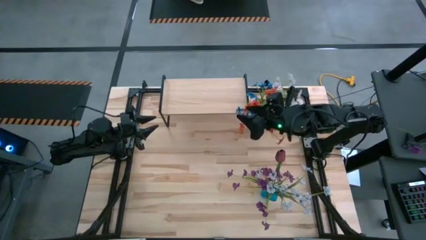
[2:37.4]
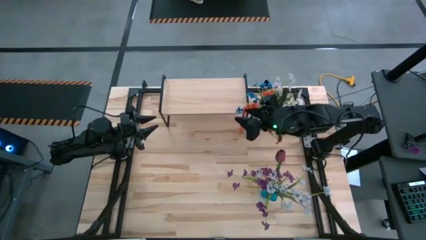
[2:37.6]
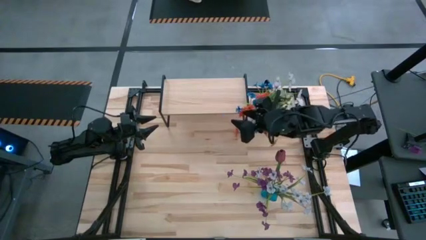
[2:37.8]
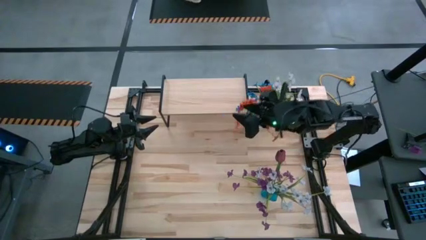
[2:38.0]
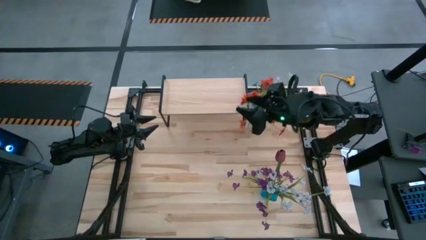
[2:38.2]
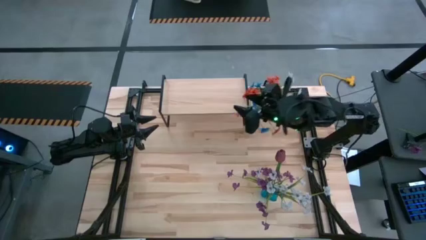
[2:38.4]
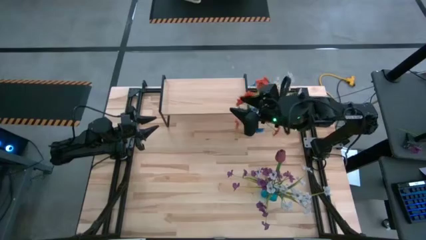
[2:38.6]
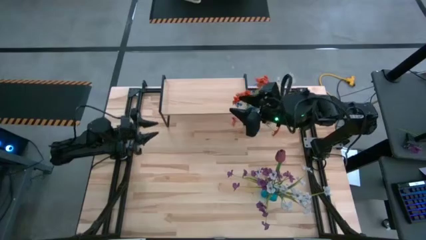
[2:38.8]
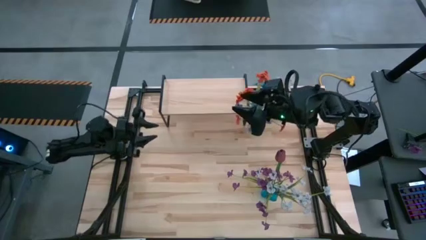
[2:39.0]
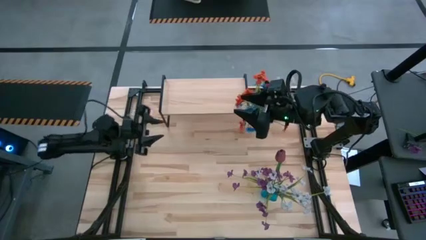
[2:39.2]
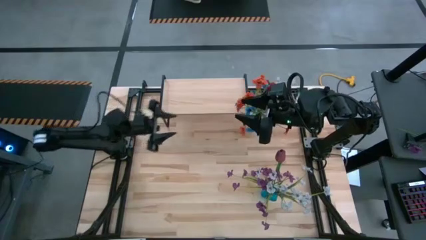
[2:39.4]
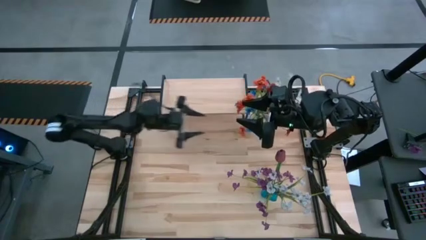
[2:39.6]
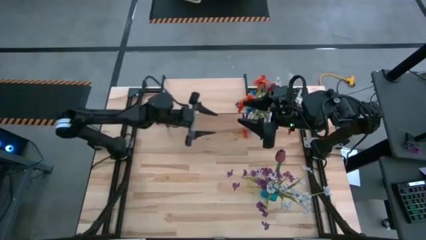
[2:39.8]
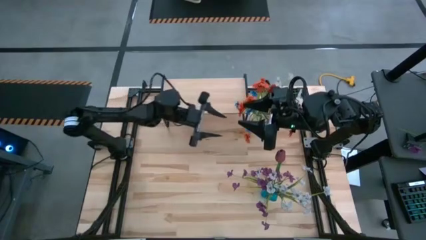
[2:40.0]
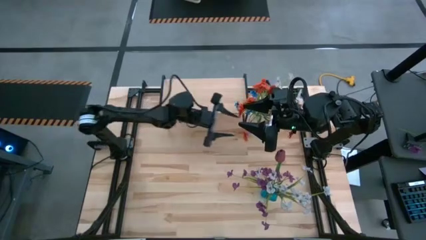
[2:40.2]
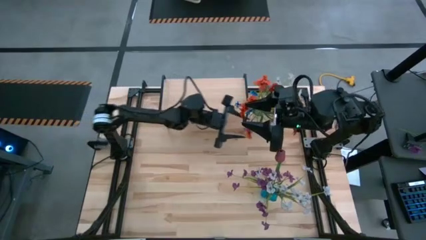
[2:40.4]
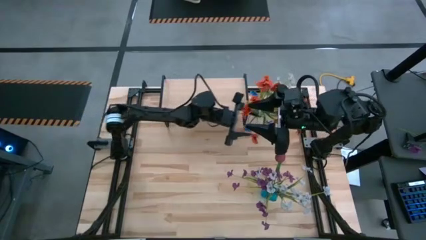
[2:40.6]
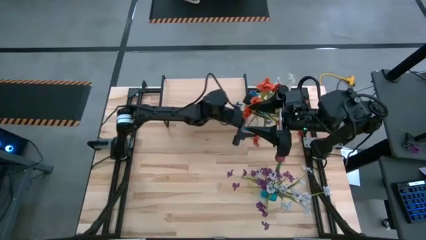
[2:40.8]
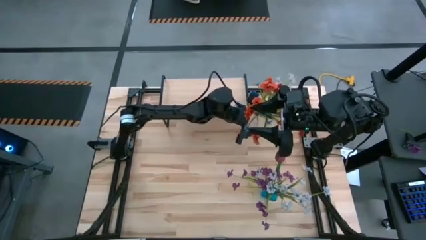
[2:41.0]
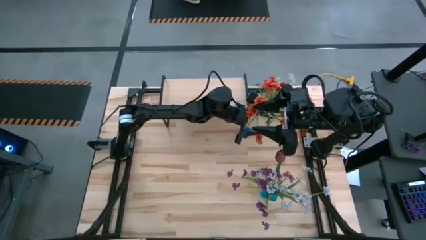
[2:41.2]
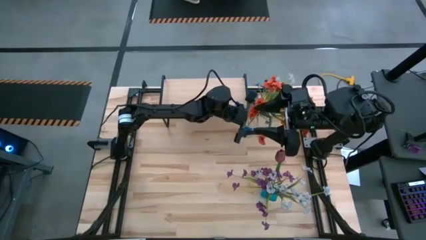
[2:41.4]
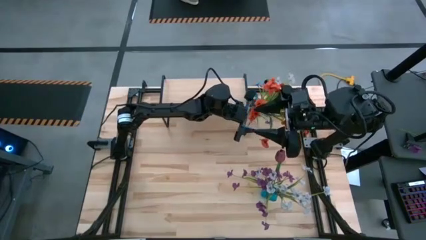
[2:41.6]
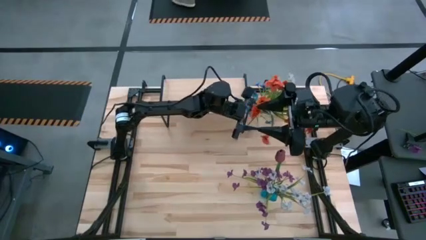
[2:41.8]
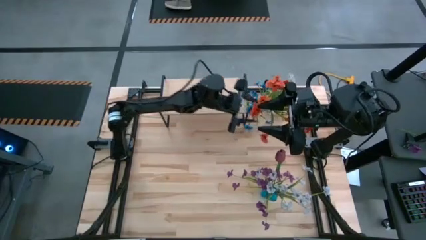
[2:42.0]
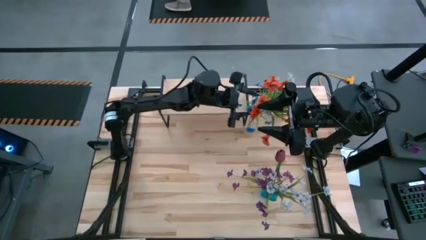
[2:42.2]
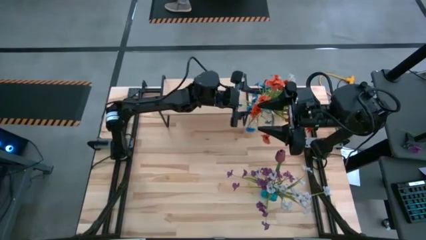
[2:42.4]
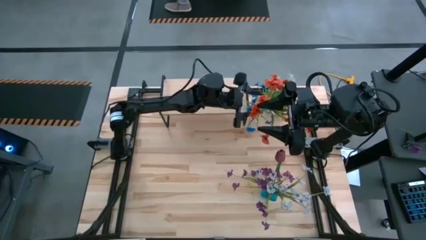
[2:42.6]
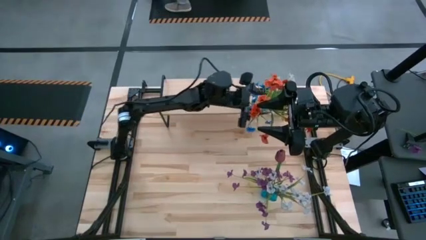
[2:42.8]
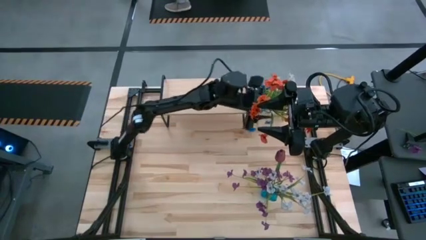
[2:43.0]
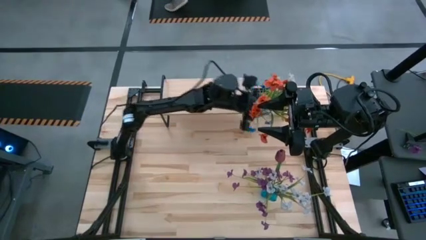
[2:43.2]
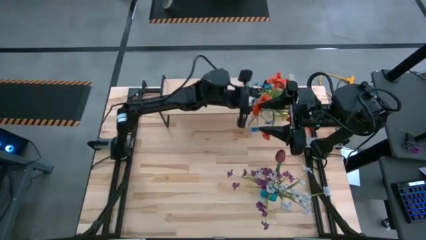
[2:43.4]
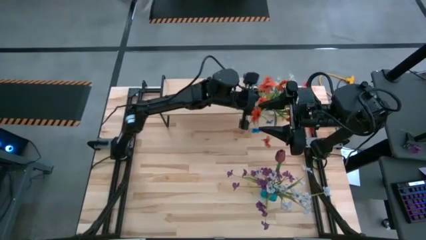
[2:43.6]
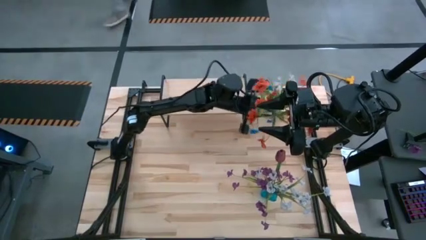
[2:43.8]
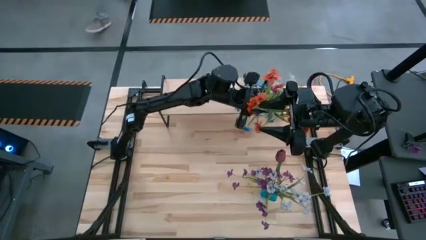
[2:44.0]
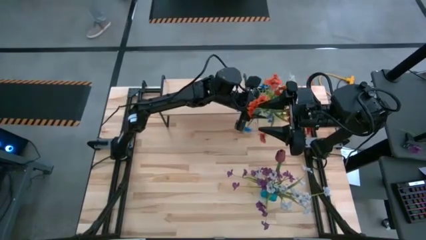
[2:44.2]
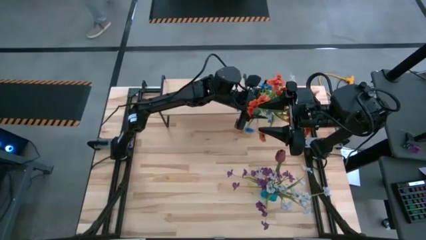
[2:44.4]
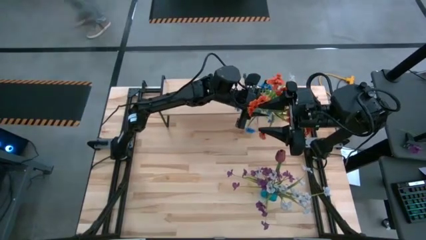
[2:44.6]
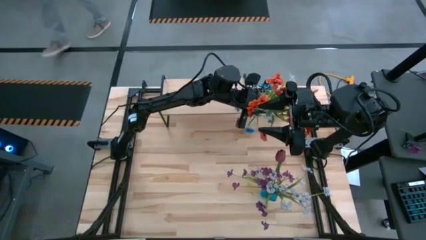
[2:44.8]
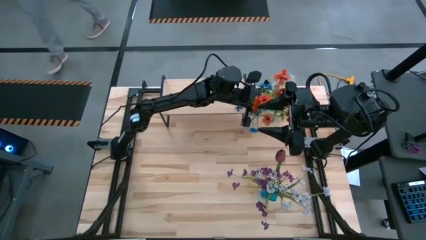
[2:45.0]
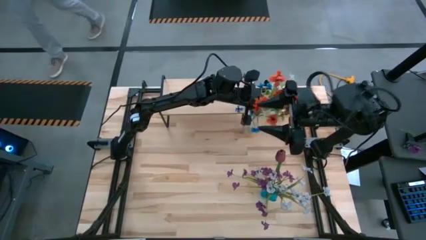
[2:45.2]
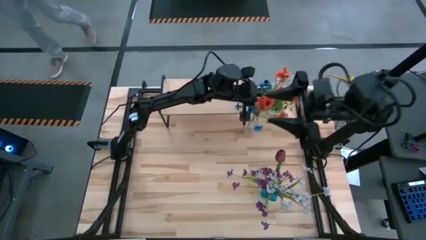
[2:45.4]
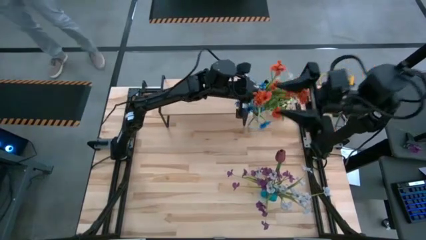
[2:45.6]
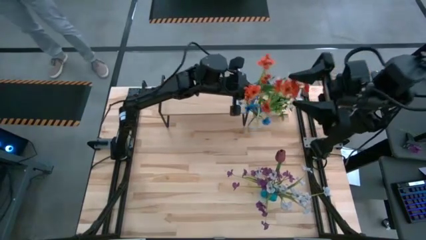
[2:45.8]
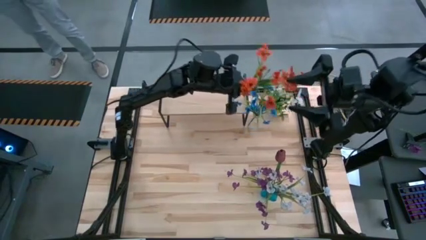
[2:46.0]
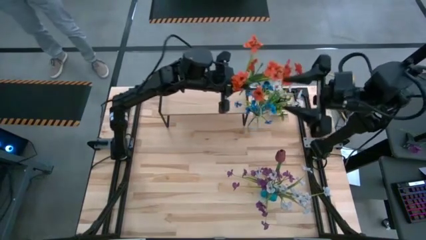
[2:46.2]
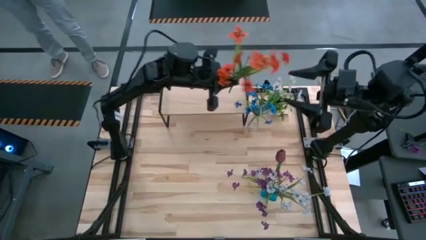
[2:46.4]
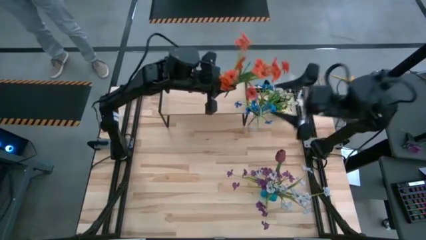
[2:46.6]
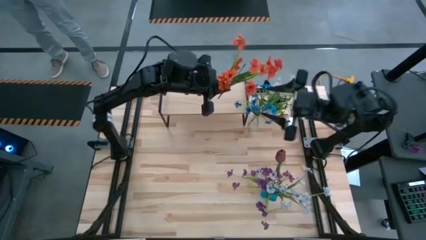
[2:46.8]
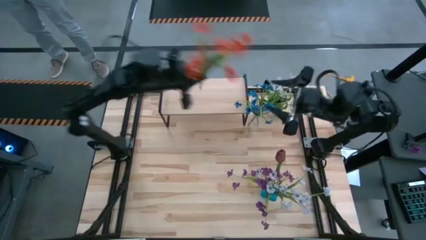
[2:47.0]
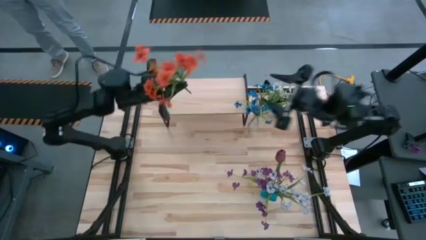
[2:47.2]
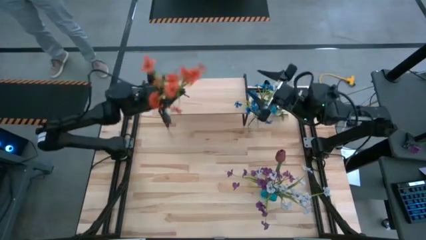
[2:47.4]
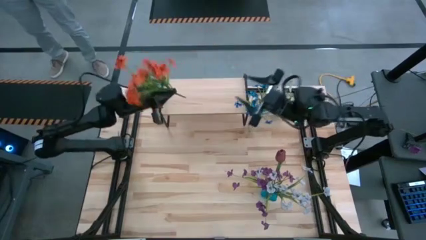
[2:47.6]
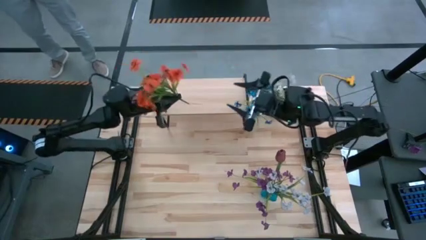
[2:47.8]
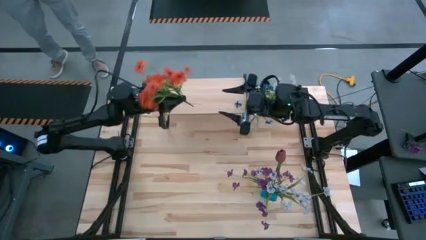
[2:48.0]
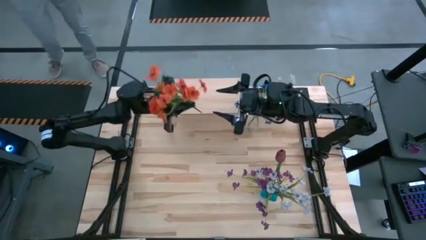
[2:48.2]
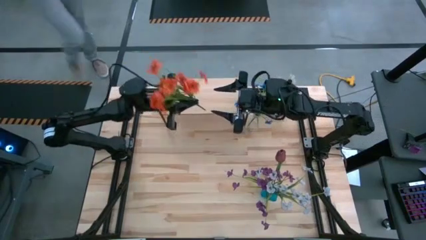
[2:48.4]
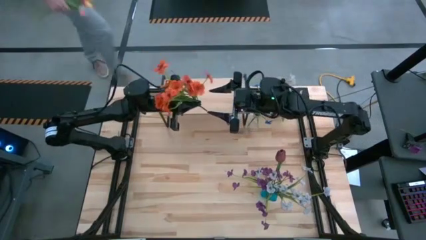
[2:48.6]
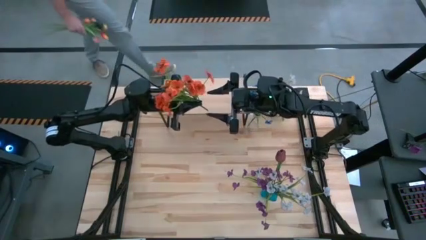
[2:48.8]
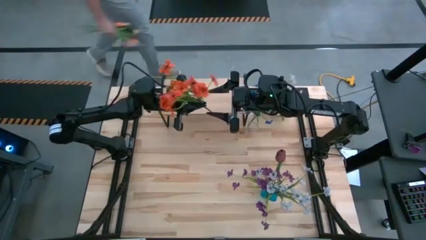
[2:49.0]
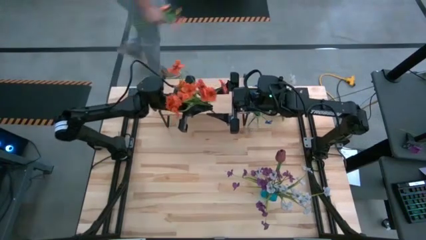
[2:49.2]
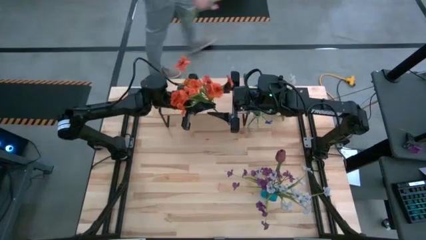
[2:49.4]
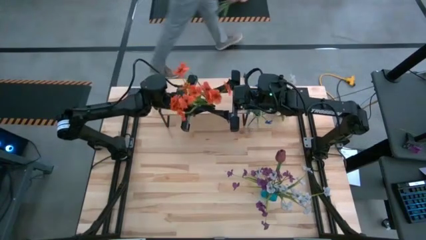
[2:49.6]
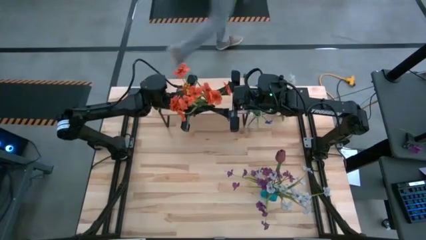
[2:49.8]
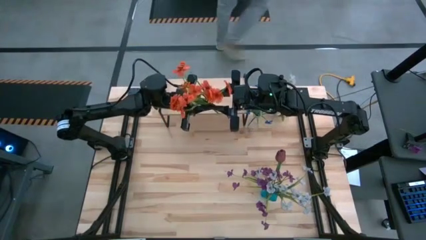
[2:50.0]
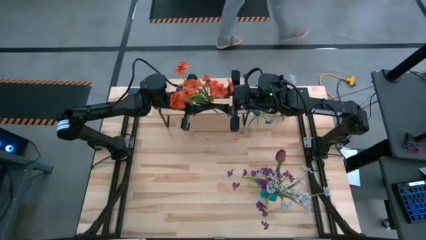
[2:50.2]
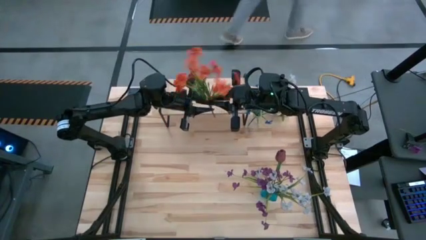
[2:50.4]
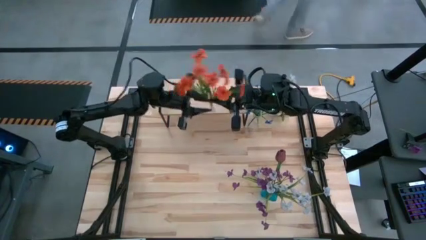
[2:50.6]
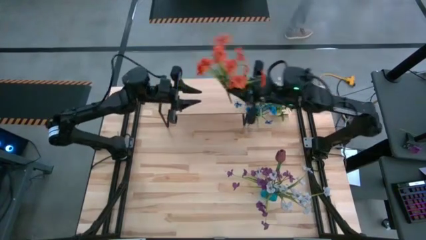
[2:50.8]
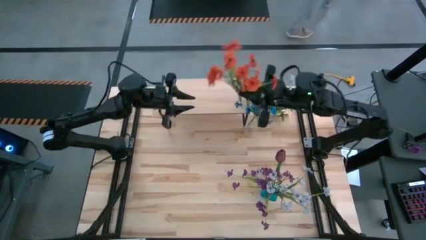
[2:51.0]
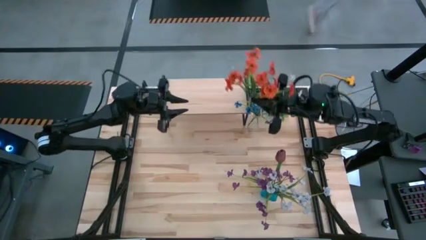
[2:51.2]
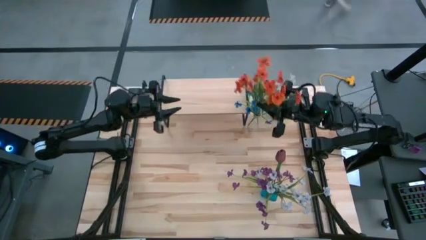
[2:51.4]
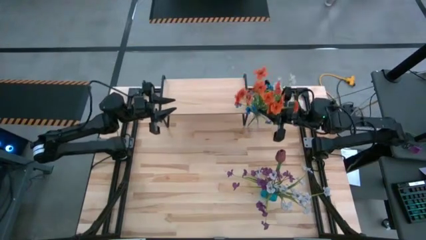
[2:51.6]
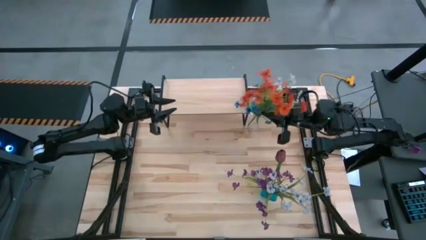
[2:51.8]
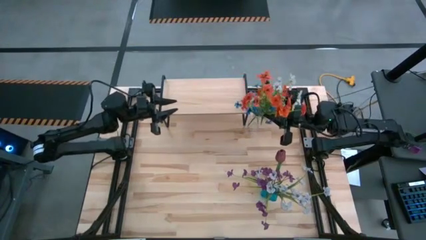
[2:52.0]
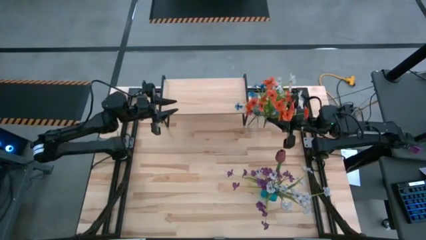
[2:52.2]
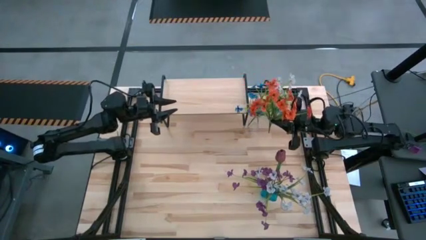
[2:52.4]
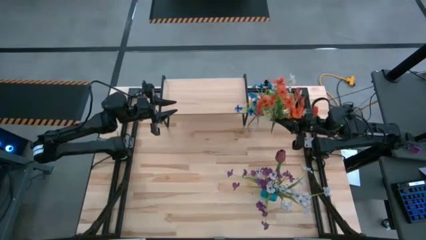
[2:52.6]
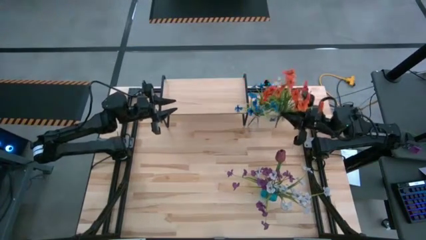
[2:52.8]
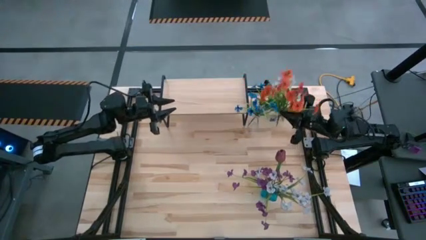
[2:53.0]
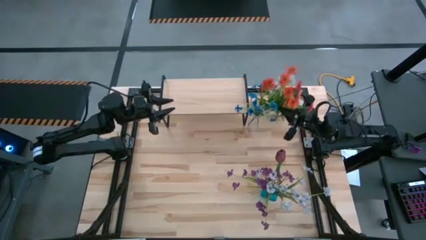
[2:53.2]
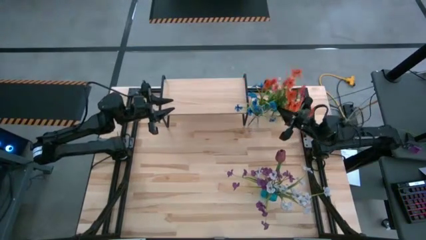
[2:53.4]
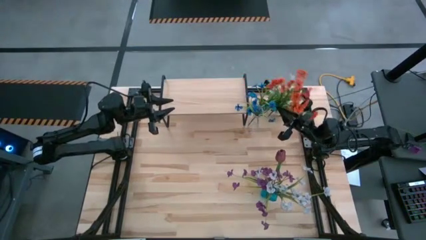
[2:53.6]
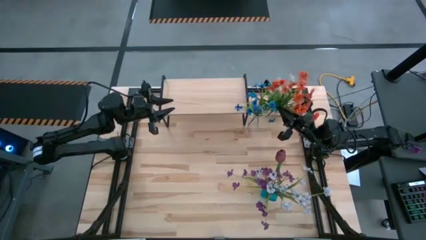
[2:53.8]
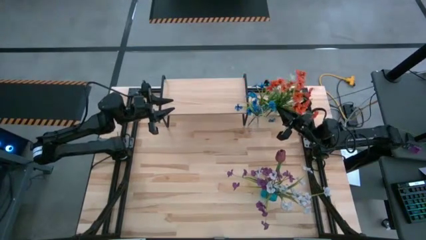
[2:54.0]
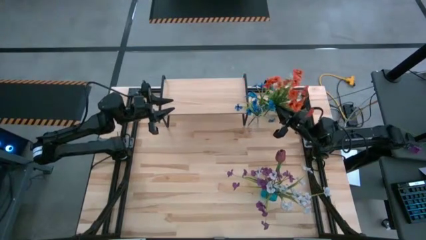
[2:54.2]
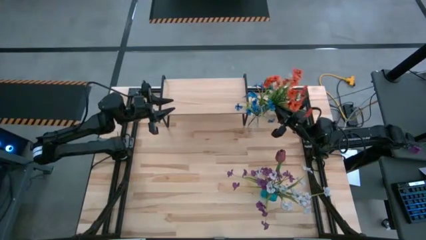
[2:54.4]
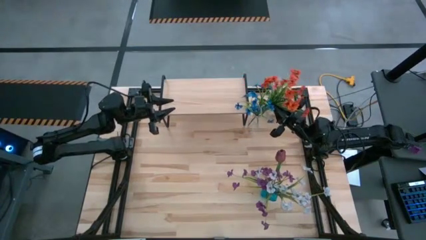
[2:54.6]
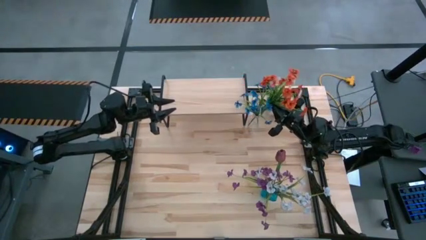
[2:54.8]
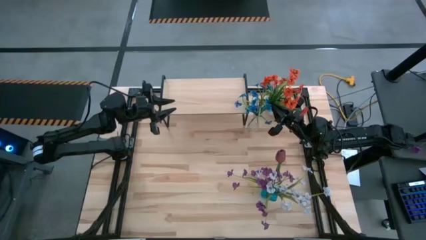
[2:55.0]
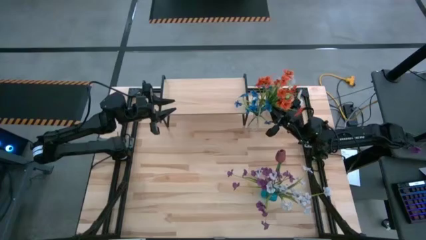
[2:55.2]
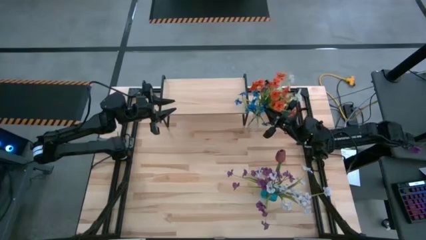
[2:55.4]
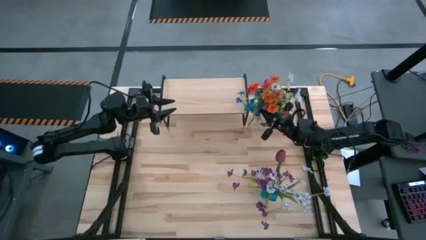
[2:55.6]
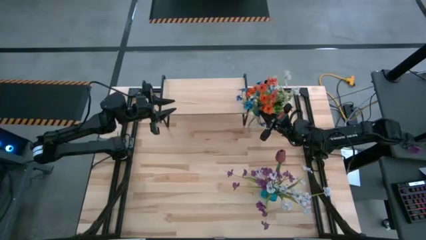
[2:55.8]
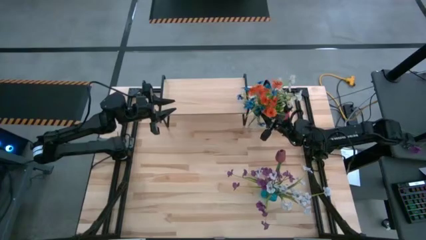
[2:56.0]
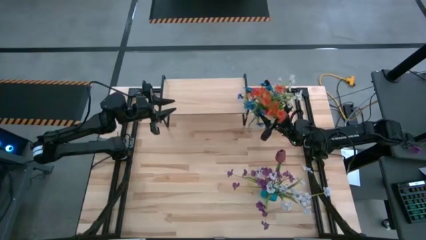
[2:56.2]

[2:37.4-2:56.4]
Task: Pick and place flowers into a vace then onto a shelf
Adjust the orange flowers on the transparent flower vase
